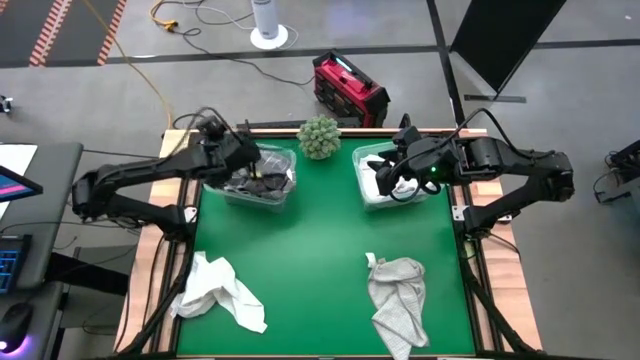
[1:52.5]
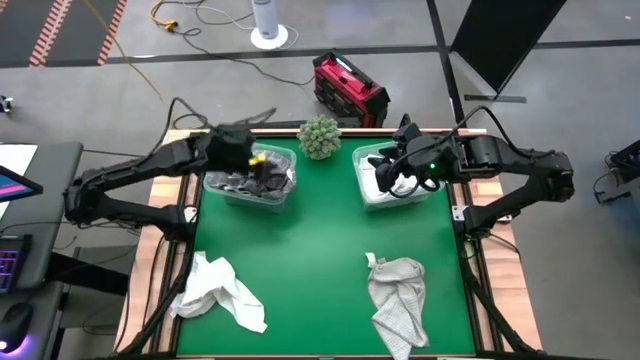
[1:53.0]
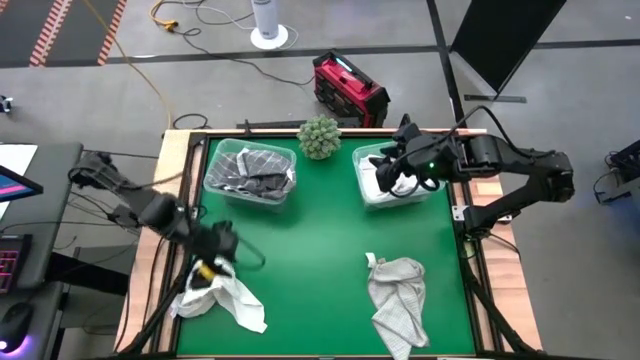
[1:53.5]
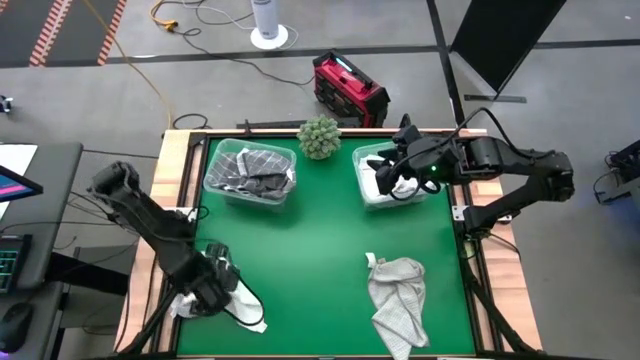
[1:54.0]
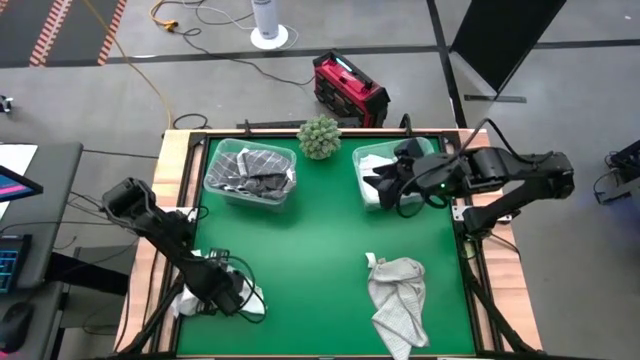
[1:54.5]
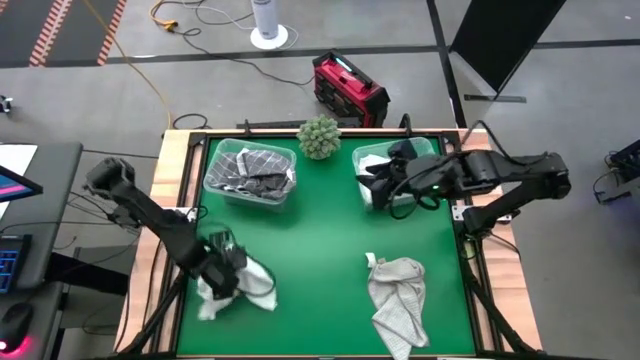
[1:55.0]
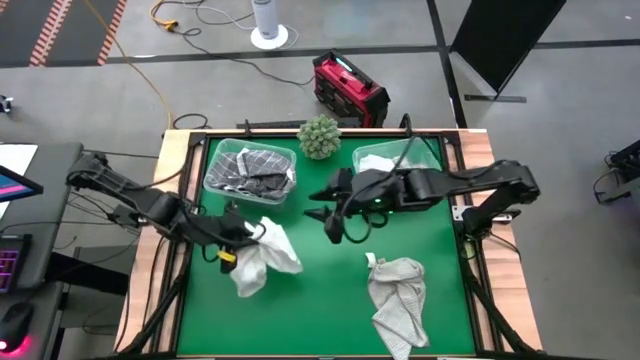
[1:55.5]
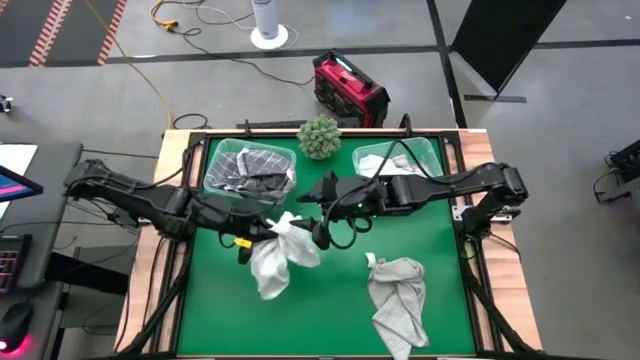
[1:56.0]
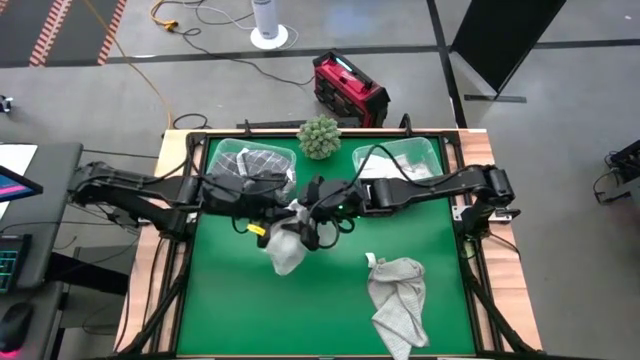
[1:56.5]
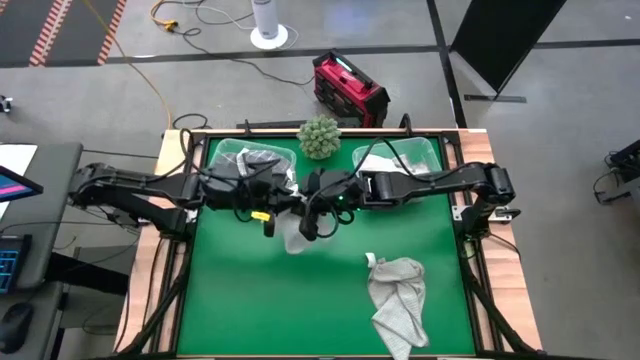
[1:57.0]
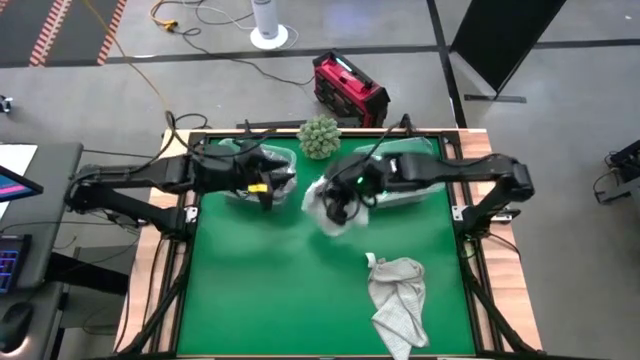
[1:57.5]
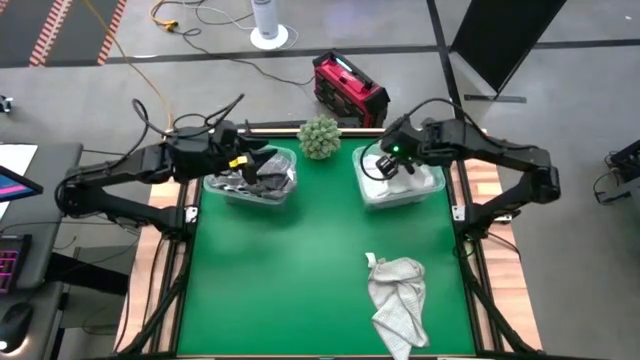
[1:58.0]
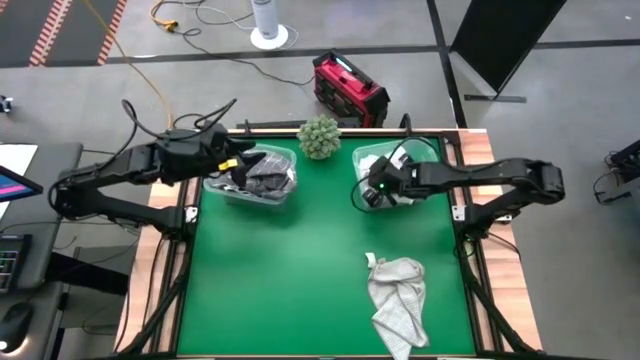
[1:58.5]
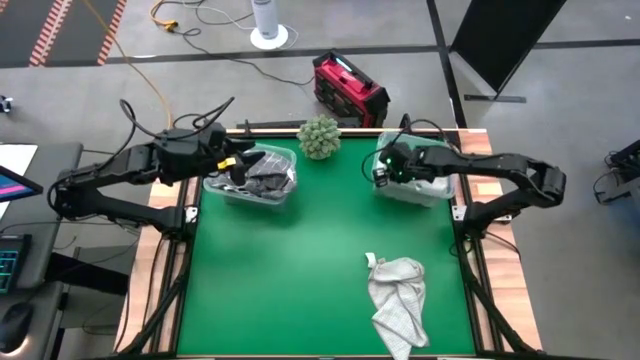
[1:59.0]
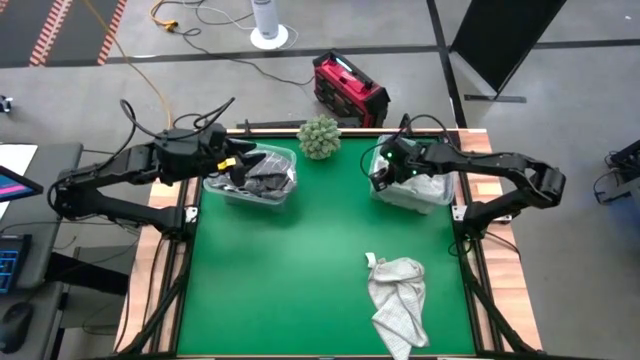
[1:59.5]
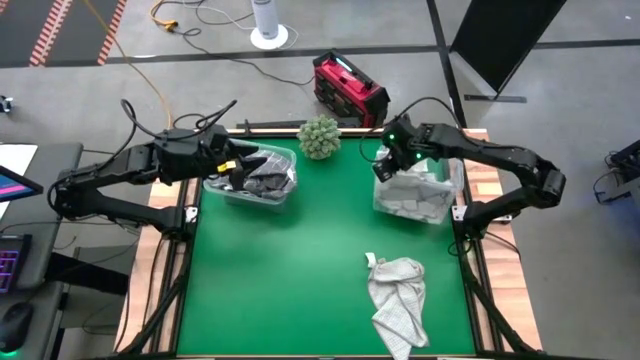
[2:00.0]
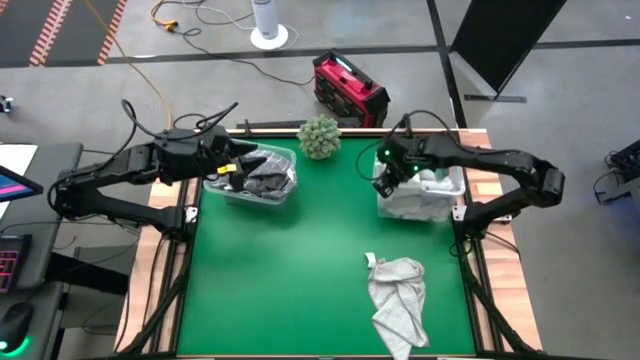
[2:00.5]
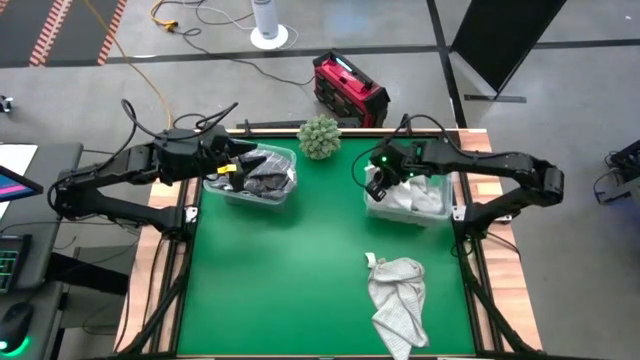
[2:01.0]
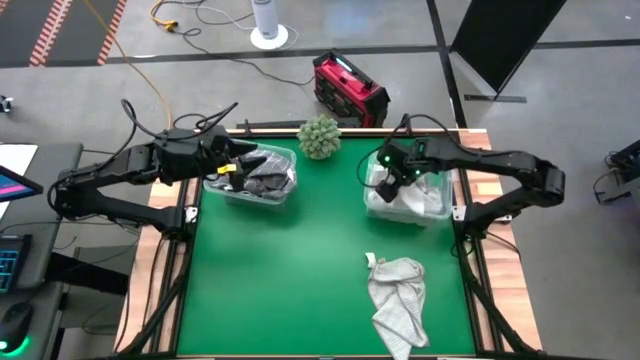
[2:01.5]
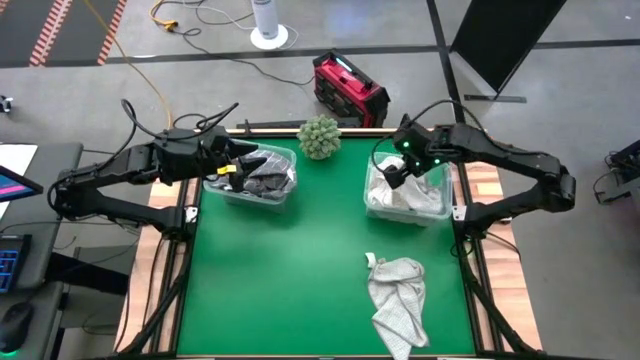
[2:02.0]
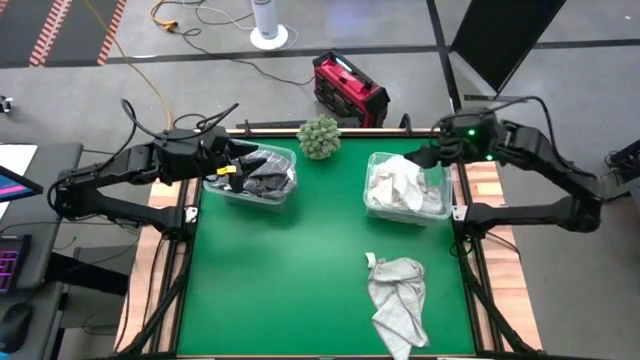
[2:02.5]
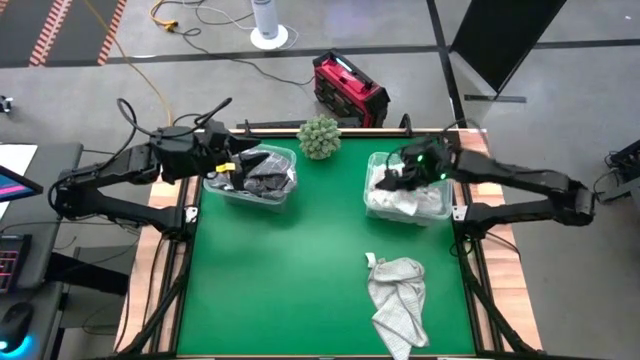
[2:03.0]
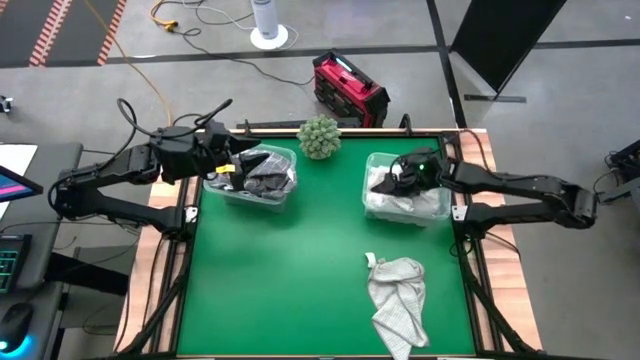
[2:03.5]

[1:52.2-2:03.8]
Task: Sort towels by color in basket
Put the white towel into the right transparent bin

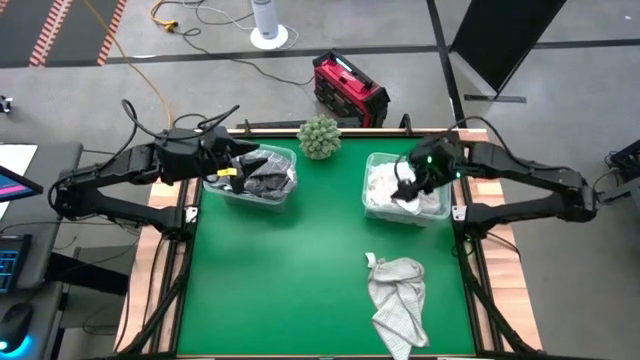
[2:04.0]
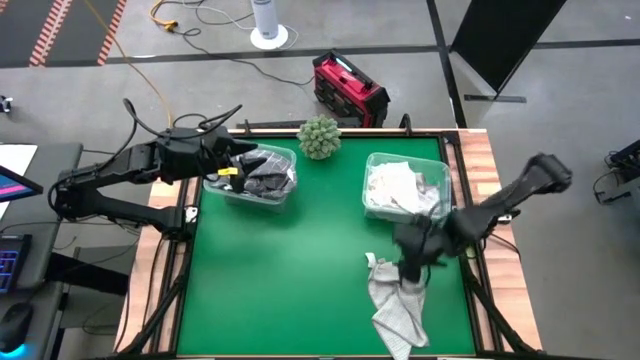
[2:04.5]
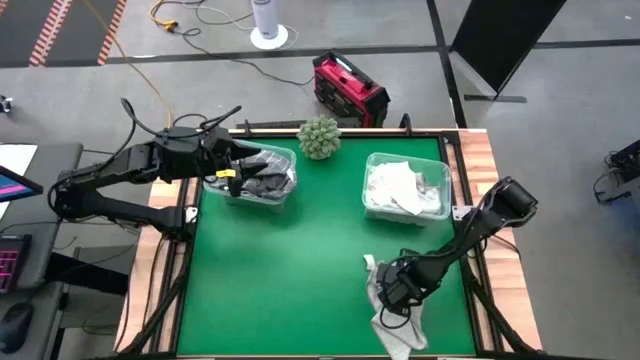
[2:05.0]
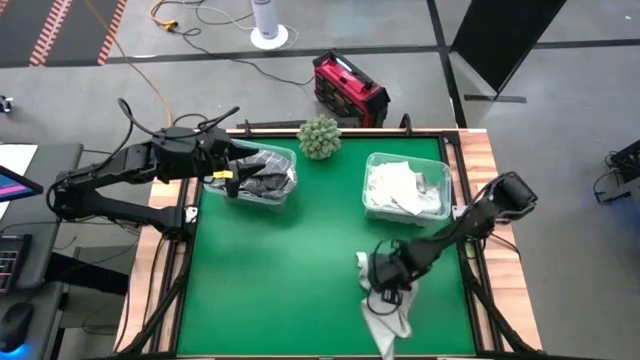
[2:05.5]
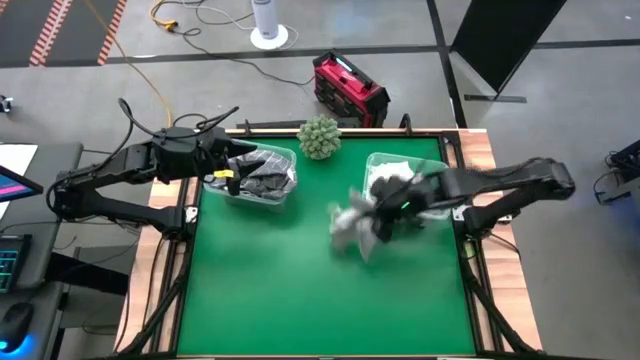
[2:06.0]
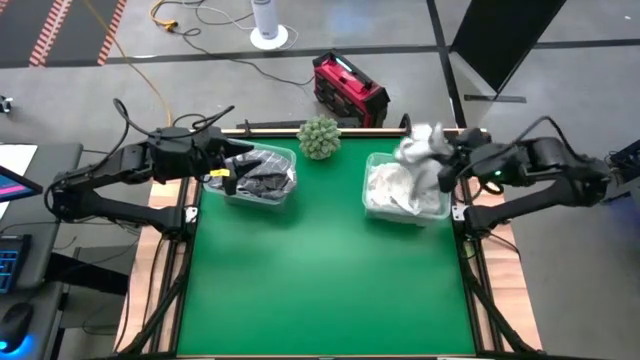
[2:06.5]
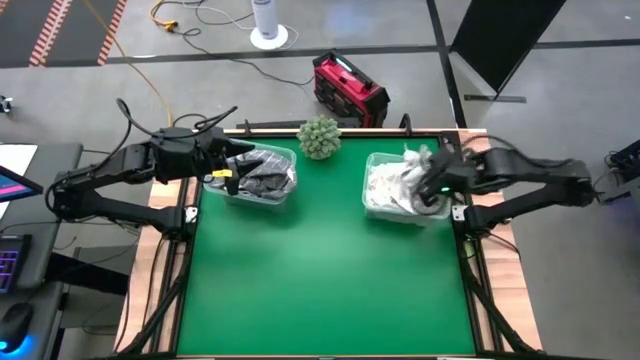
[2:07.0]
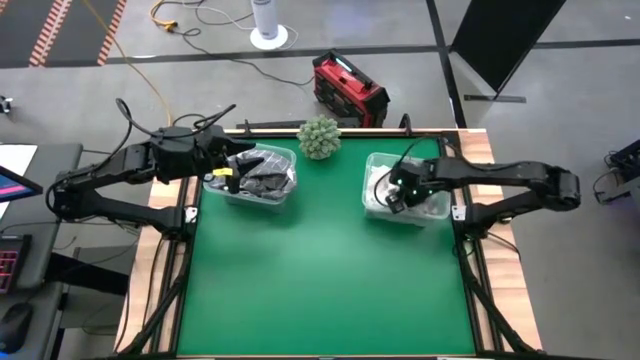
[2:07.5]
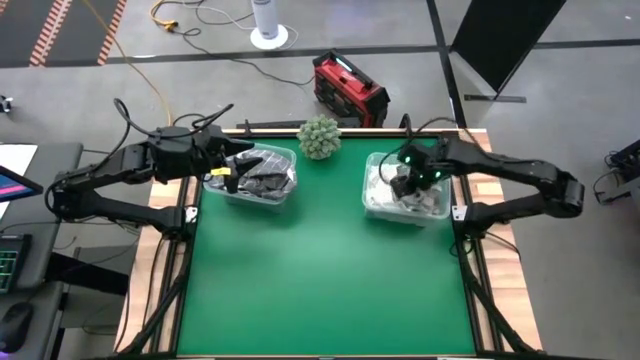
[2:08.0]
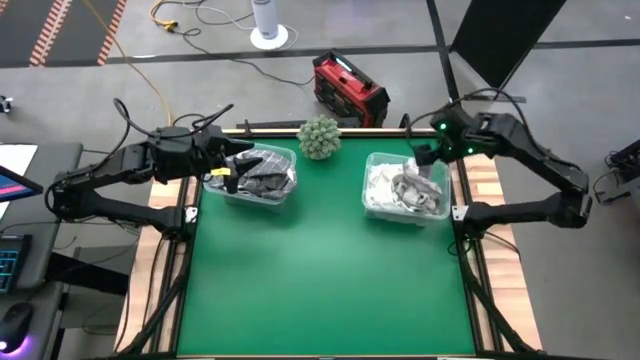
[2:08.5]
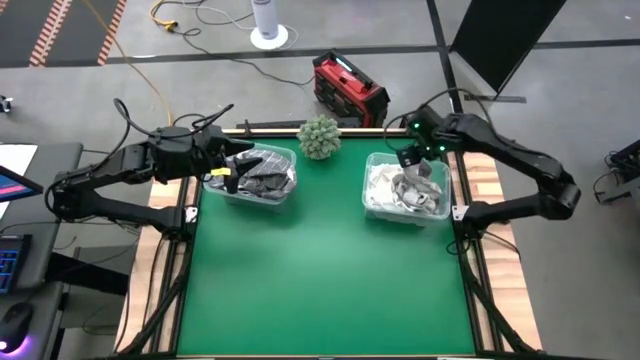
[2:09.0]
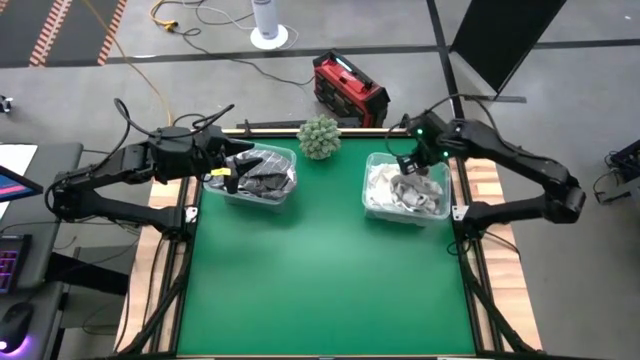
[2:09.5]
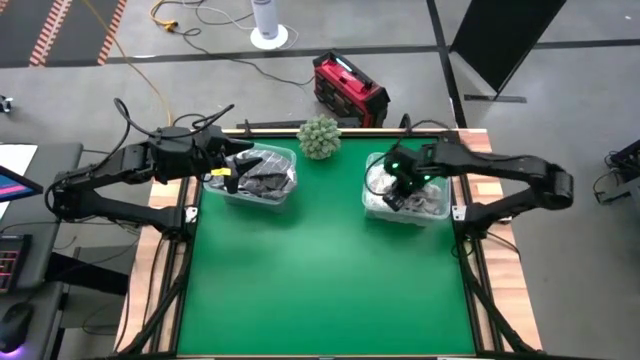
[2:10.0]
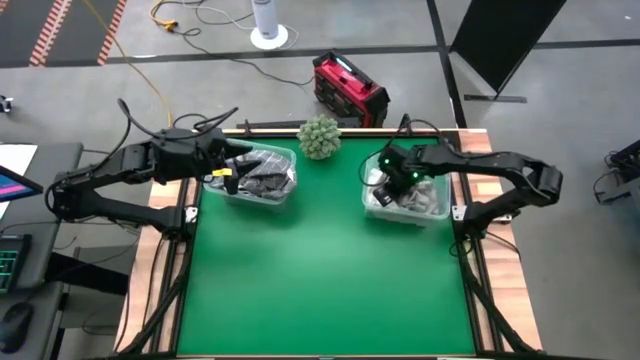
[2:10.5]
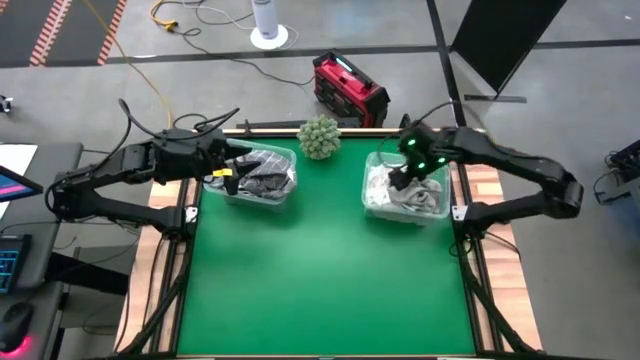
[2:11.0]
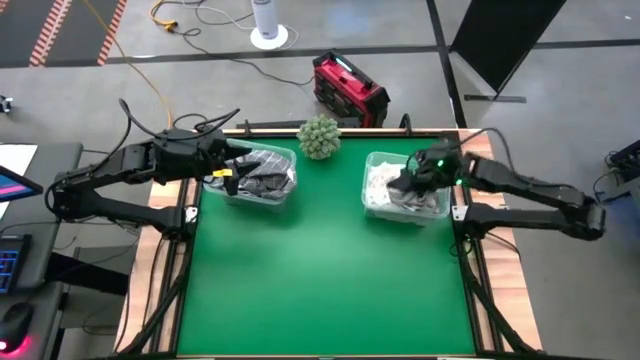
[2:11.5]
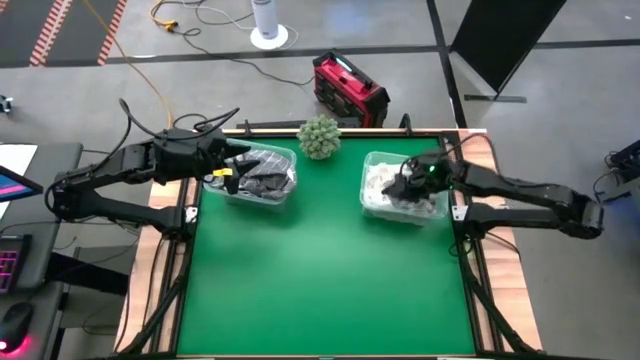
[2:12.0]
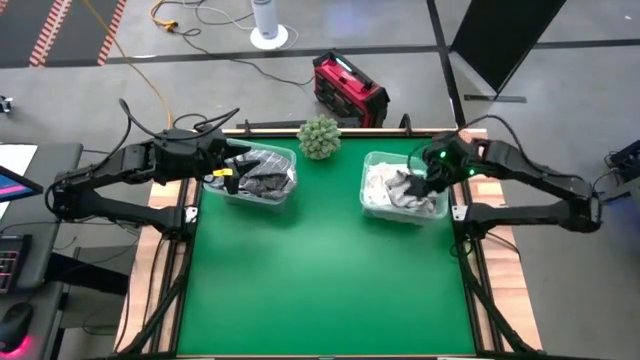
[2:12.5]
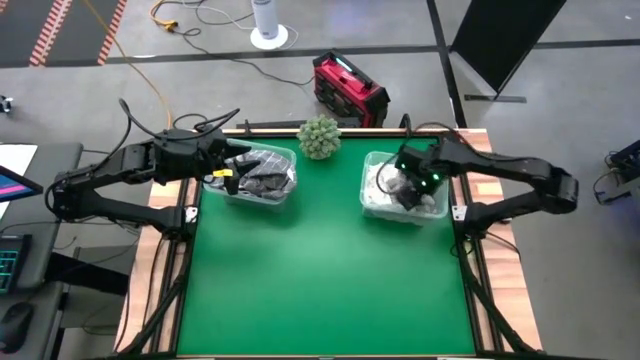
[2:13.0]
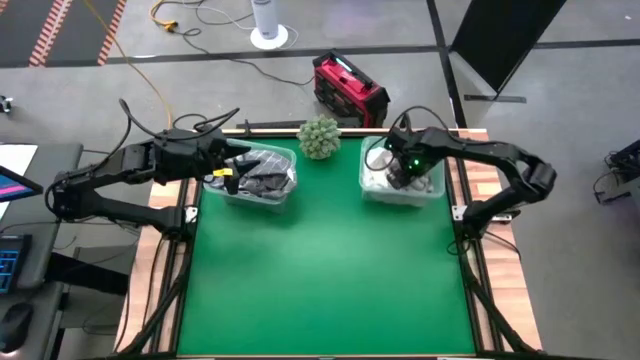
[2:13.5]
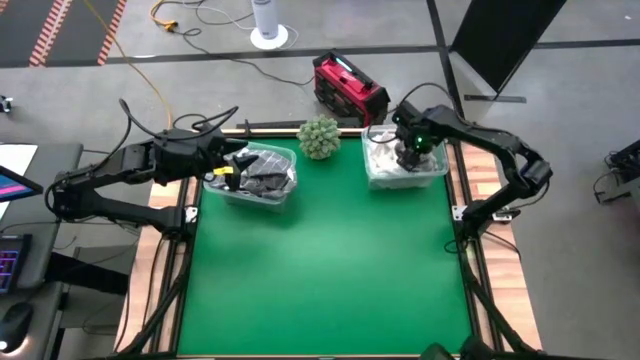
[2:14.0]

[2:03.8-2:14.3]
Put the grey towel into the right transparent bin
